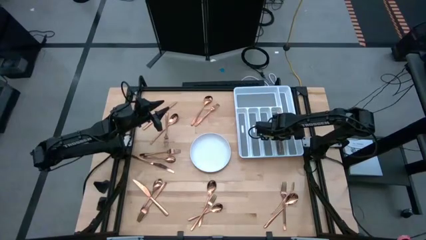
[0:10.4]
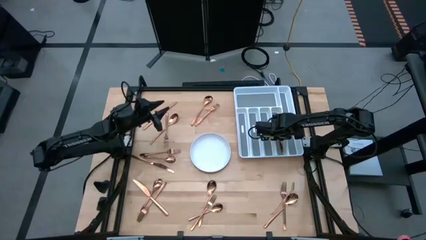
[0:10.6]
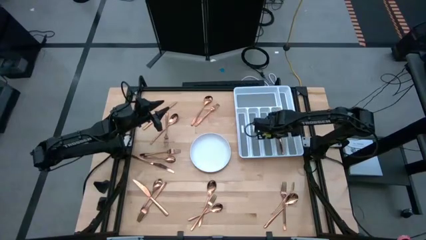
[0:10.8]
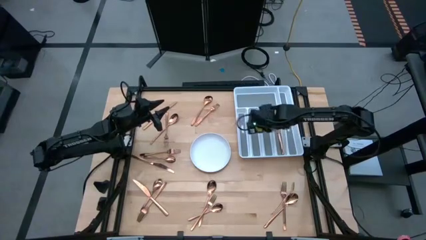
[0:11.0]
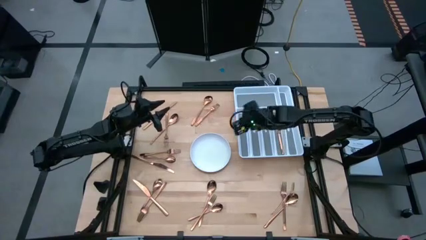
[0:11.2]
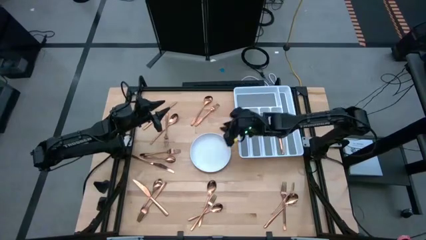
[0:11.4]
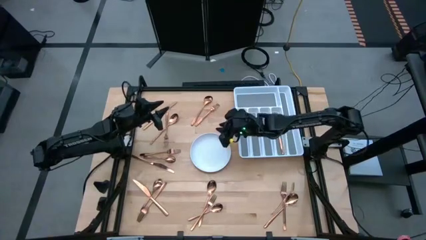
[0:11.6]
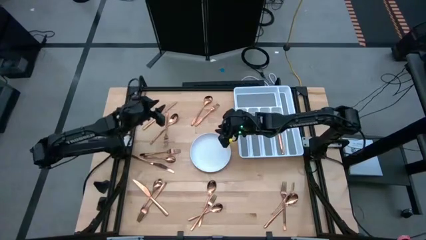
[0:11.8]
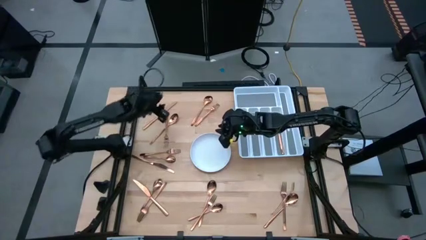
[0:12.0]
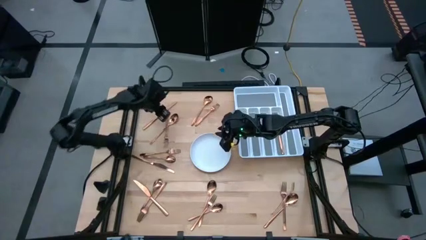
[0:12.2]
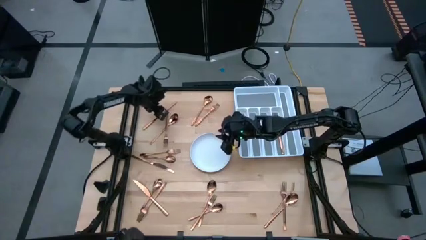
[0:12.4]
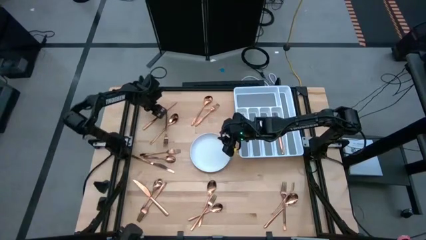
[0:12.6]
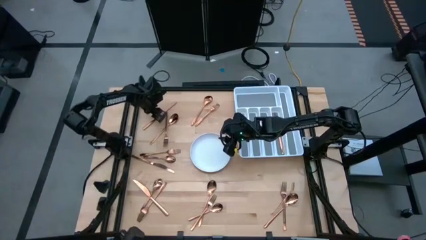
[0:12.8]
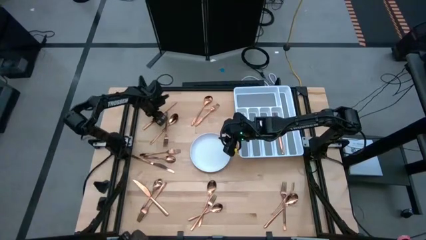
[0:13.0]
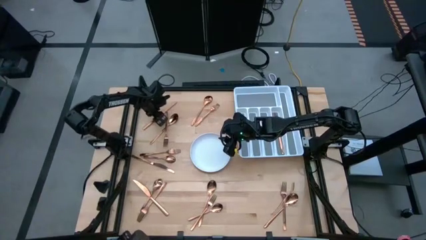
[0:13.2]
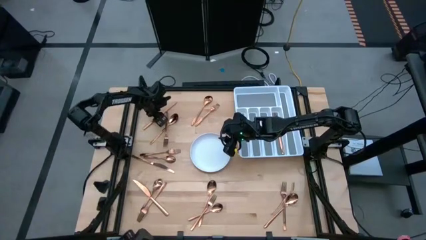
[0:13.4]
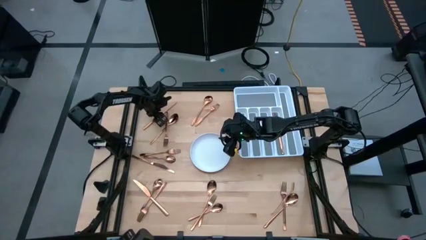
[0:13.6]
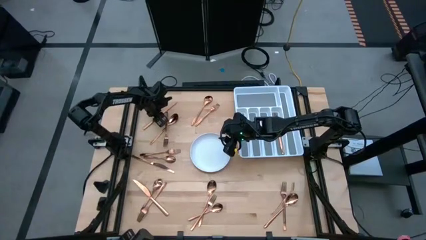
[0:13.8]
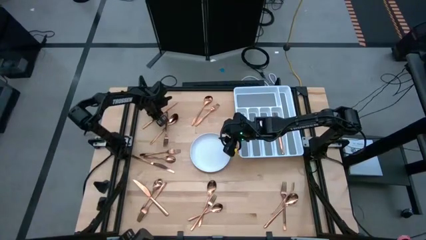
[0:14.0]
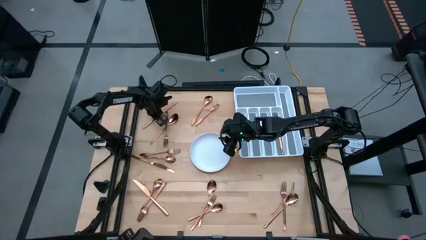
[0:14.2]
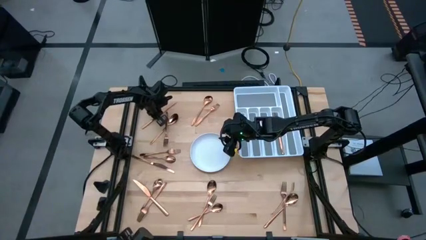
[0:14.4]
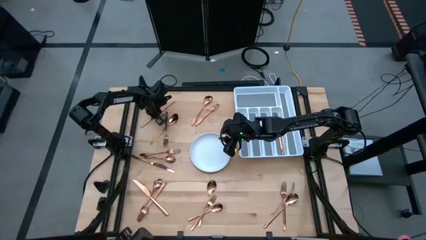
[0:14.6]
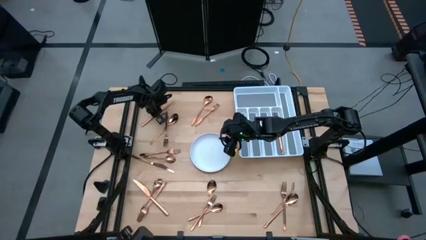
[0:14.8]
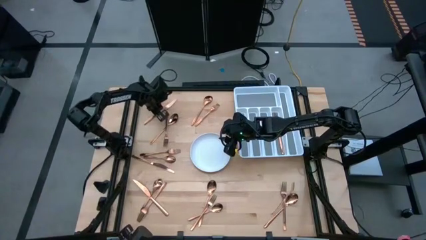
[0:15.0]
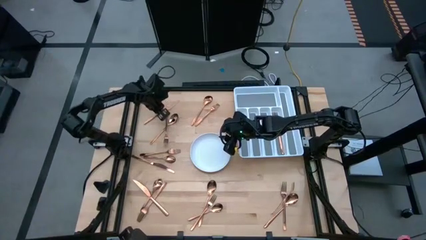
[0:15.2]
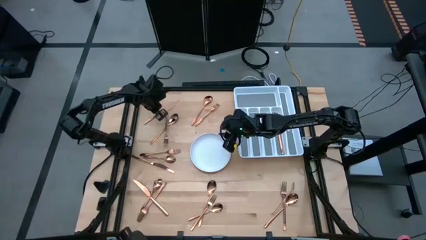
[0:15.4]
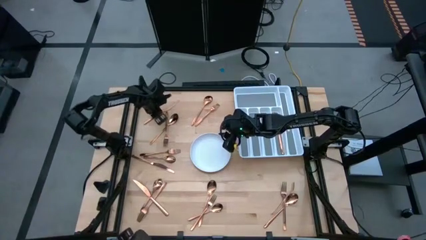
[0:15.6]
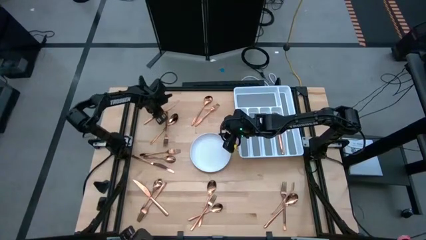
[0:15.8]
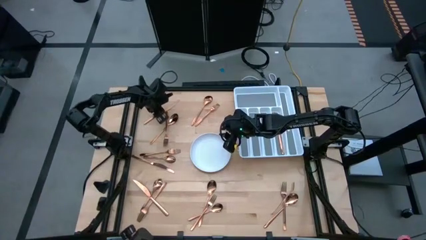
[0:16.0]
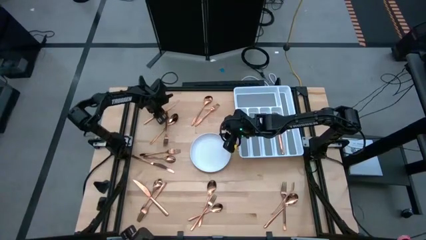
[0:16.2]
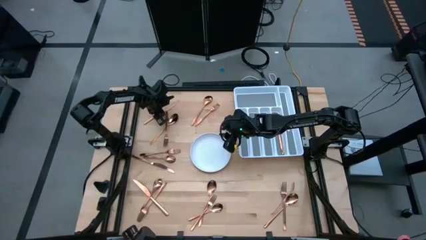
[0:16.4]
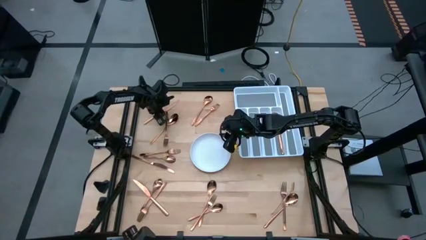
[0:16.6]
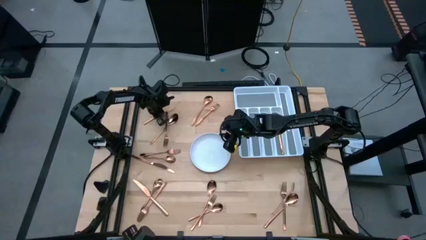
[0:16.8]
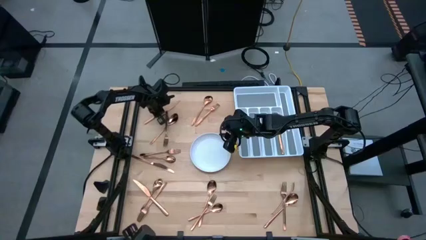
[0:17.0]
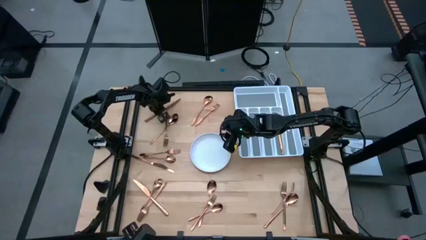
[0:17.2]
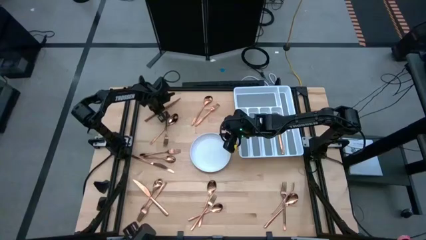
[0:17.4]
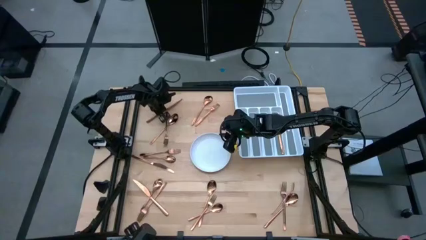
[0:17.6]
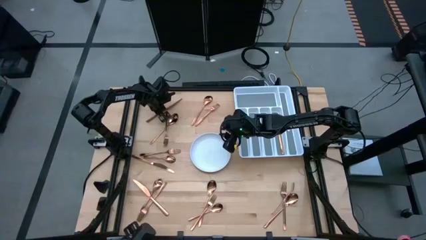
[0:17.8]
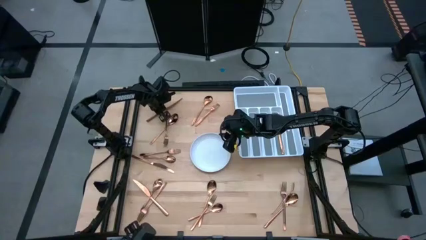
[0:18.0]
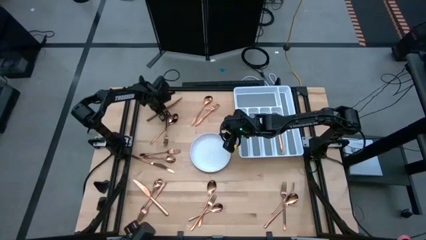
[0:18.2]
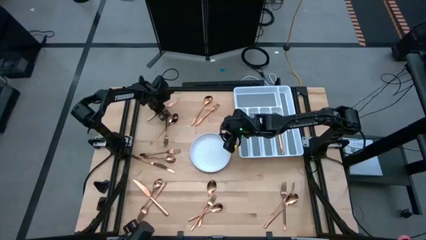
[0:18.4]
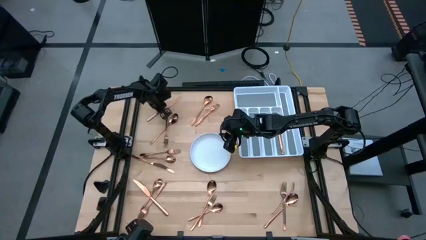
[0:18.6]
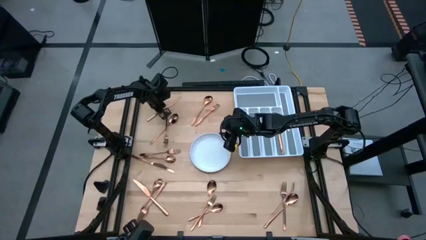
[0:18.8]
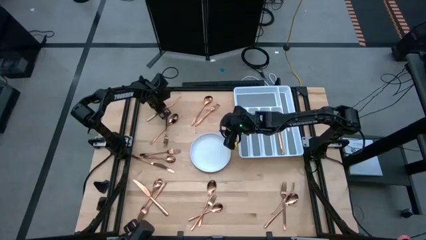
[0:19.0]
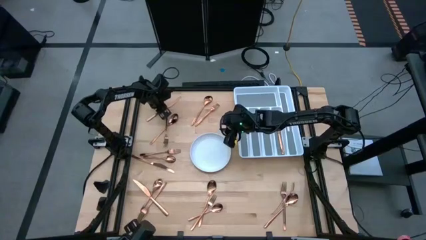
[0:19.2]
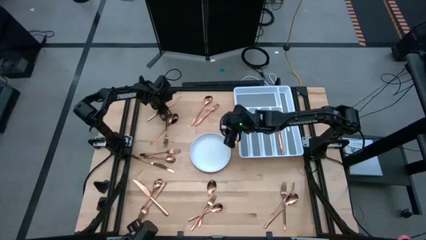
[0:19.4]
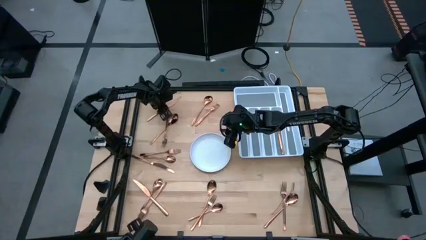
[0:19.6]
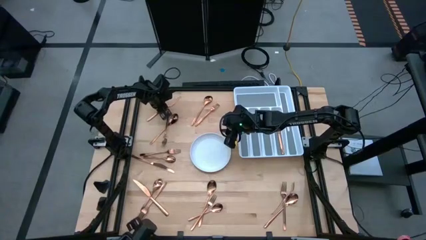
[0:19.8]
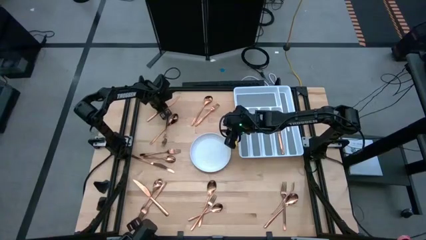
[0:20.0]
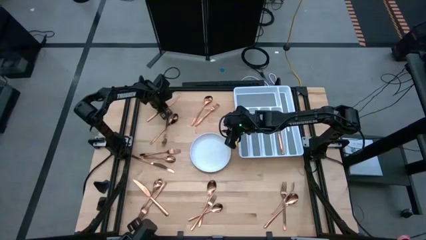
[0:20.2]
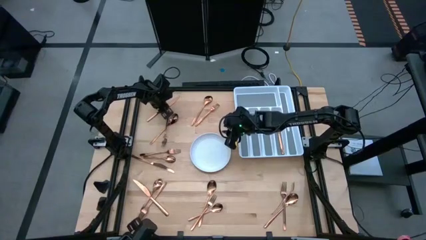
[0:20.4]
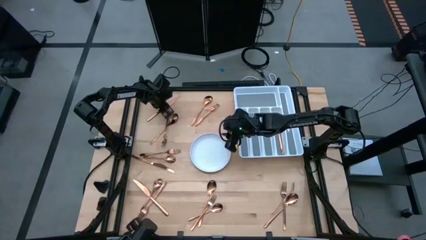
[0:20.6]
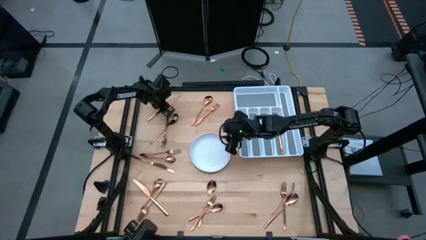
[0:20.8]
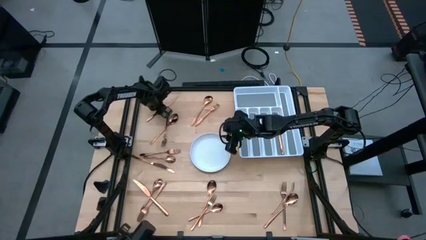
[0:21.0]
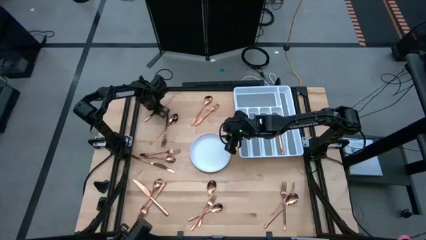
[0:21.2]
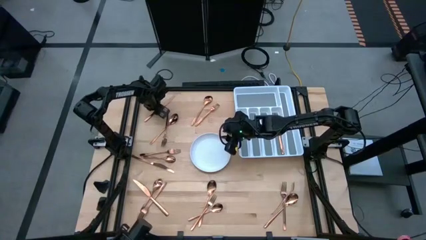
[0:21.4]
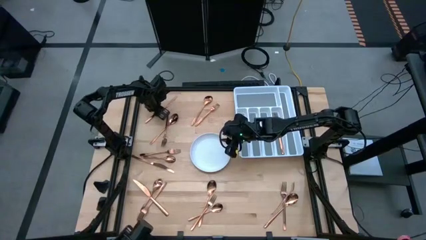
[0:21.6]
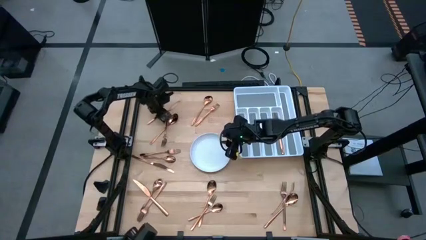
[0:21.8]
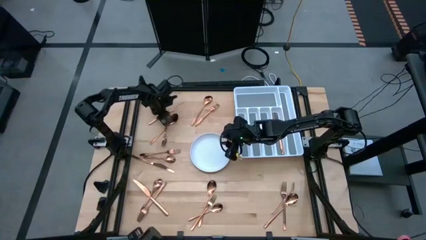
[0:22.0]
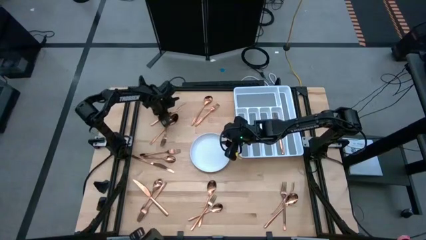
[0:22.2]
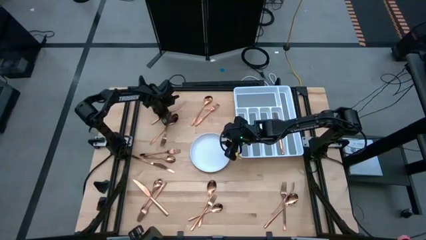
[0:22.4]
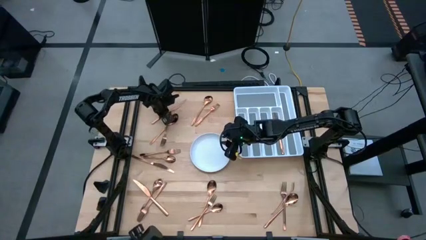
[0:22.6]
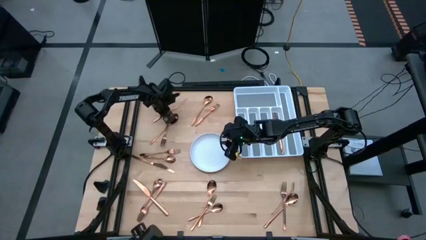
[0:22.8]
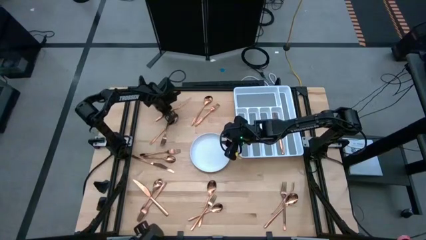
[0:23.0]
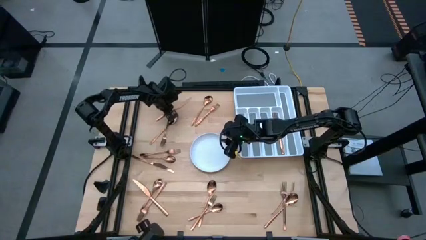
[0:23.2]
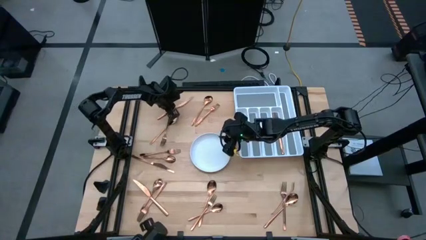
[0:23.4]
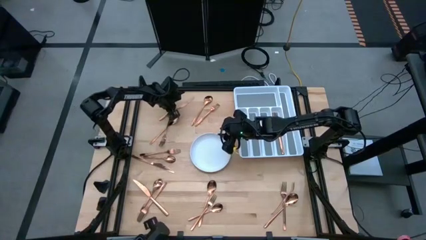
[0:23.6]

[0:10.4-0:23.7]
Task: Sort silverware
Put the knife in the silverware tray
